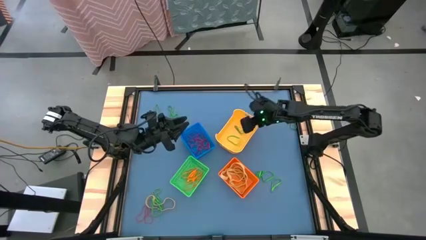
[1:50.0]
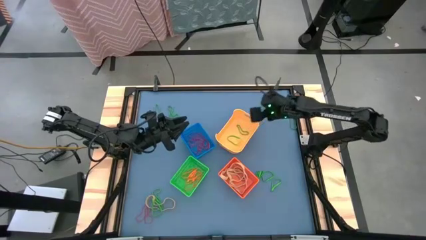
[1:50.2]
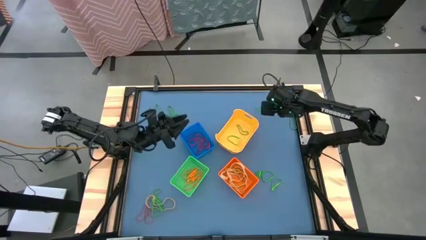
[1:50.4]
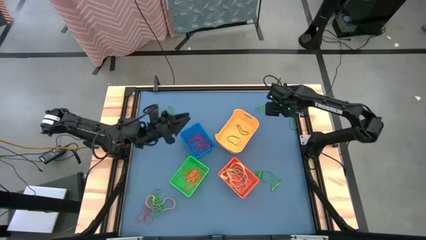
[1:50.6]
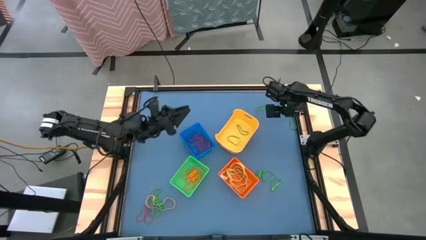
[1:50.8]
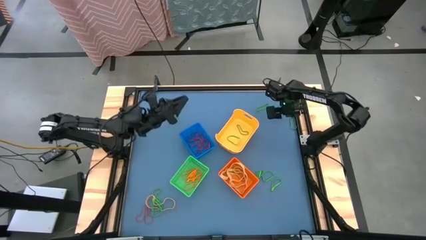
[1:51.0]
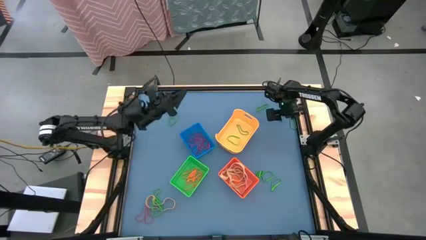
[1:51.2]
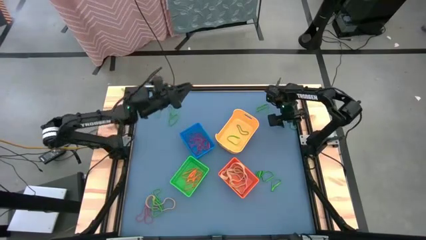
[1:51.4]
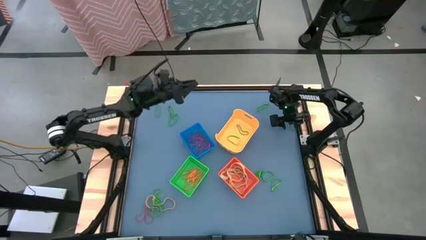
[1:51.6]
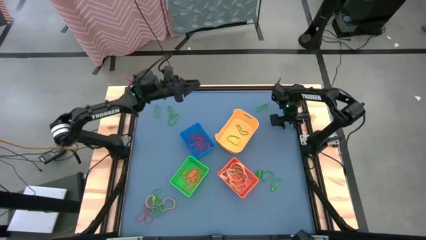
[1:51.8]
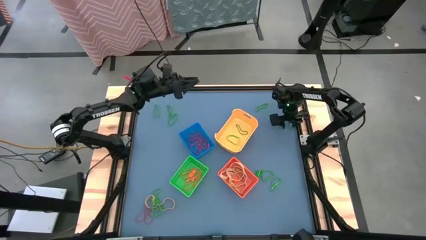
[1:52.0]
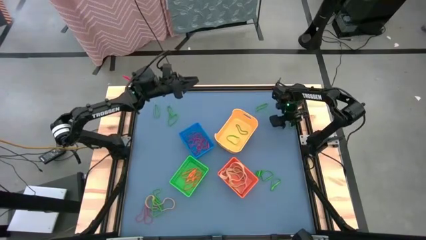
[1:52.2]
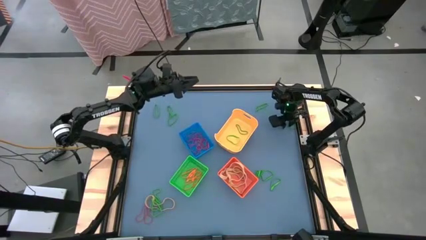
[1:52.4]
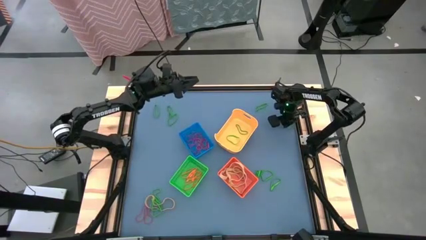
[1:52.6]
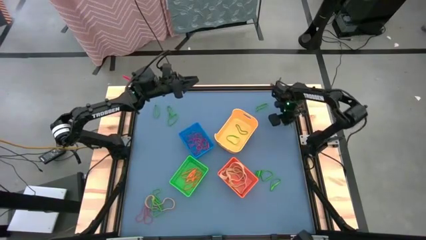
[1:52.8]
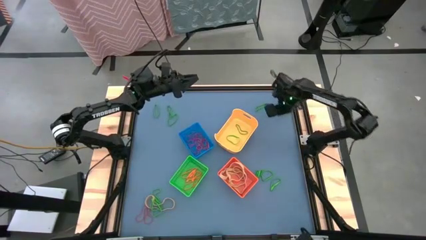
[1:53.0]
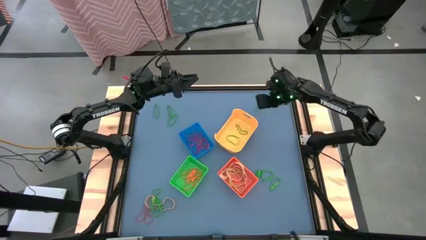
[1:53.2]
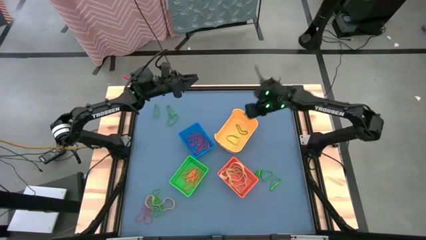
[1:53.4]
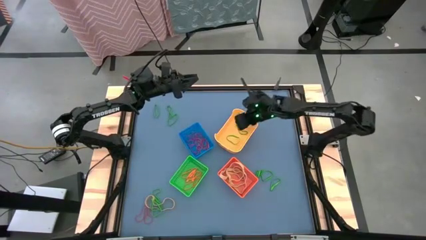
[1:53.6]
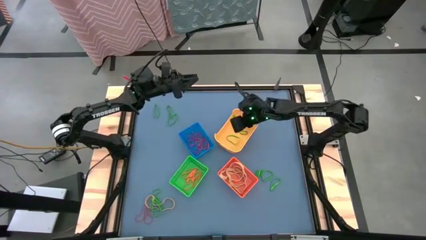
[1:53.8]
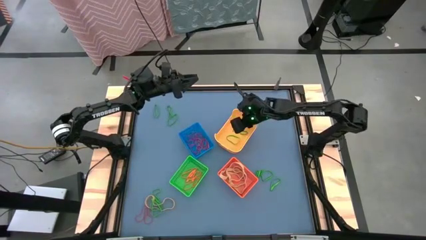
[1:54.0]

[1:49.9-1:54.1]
Task: Sort rubber bands into baskets
Put the green rubber band into the yellow bin

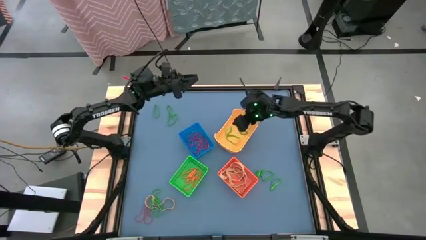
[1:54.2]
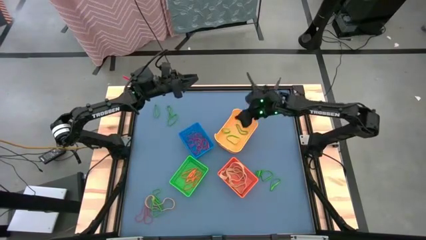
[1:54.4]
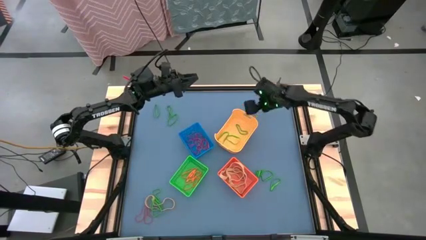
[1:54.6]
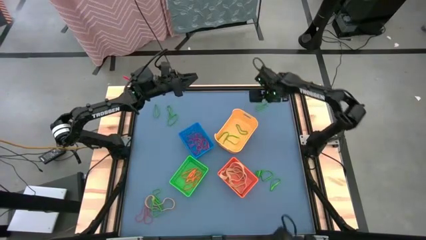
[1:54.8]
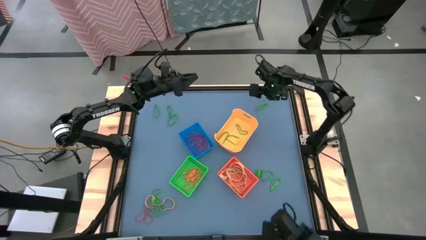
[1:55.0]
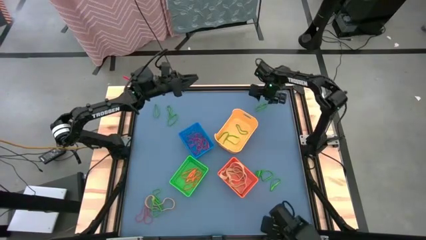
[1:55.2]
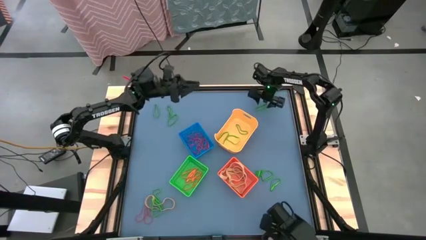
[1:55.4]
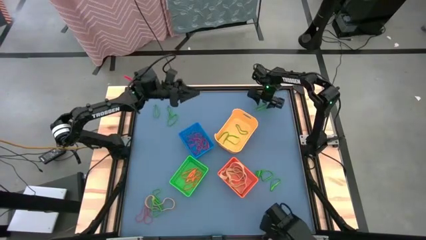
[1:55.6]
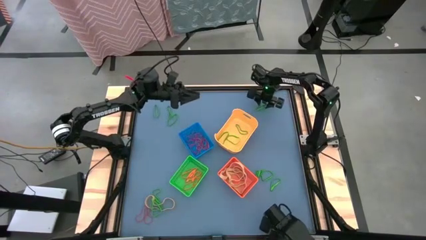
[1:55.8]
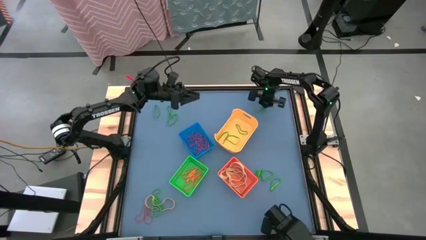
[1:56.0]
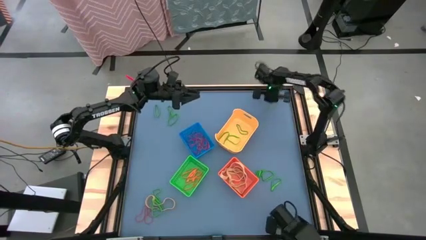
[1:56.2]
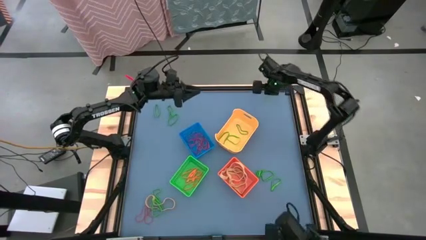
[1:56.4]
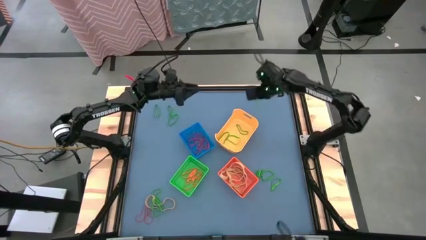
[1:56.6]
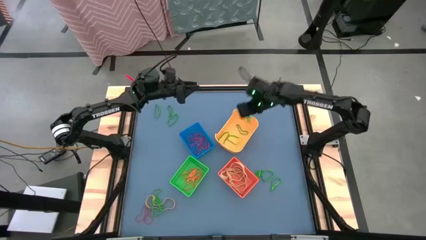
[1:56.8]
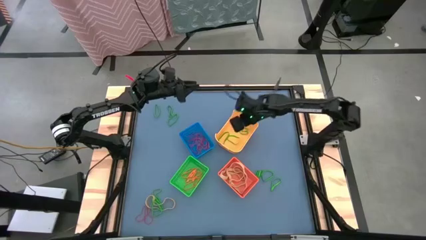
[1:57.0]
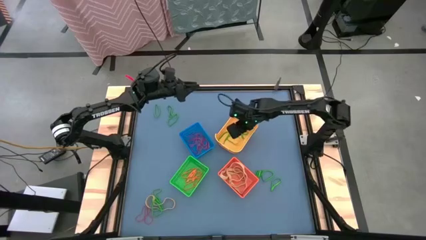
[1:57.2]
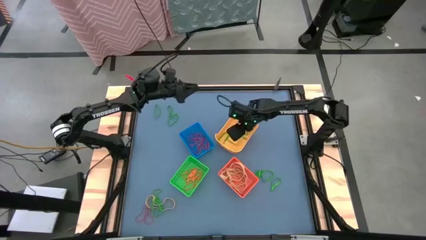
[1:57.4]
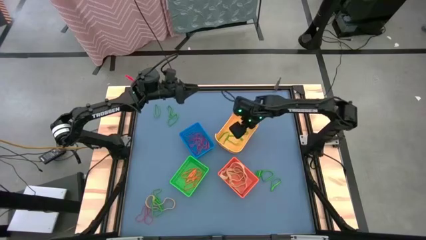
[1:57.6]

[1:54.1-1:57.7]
Put the green rubber band into the yellow bin

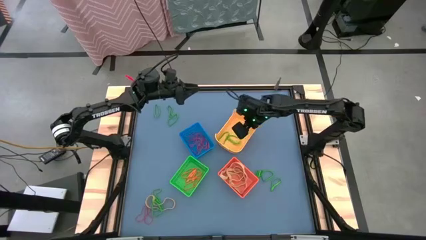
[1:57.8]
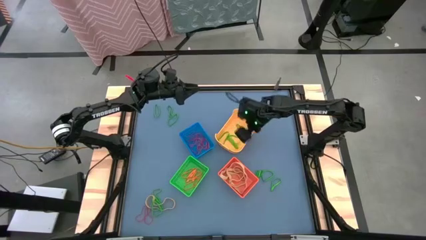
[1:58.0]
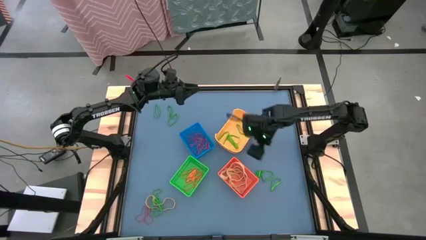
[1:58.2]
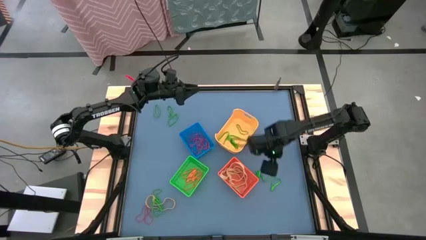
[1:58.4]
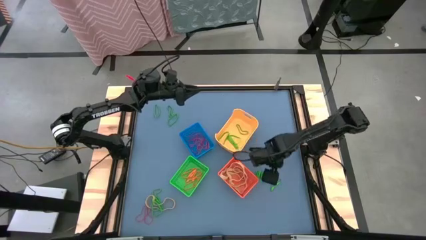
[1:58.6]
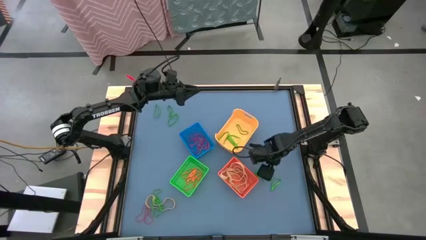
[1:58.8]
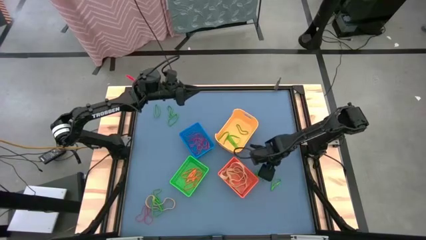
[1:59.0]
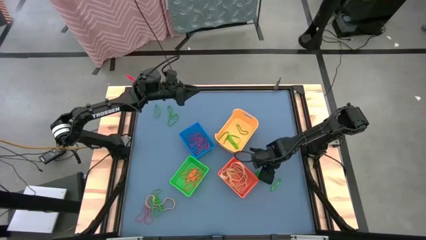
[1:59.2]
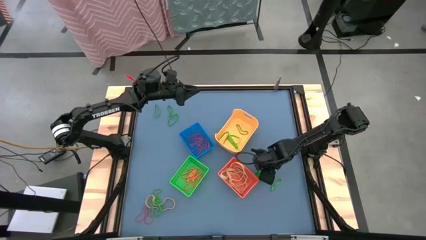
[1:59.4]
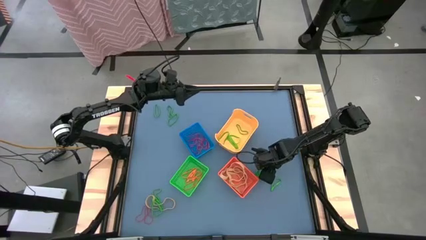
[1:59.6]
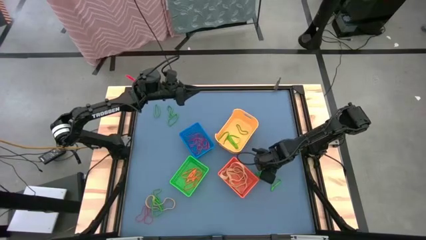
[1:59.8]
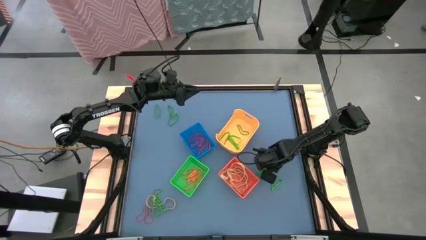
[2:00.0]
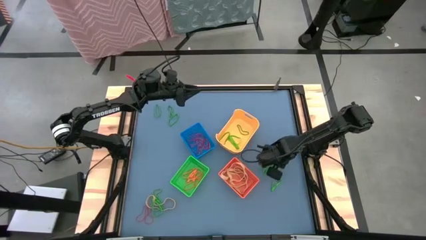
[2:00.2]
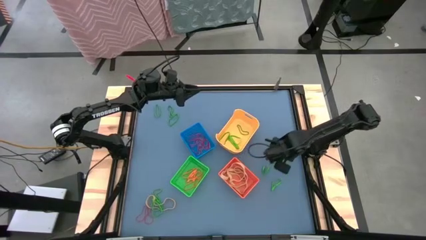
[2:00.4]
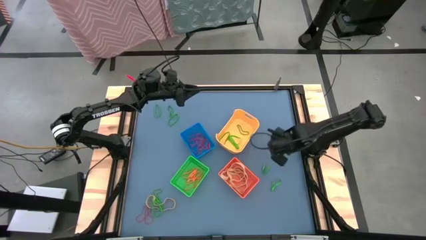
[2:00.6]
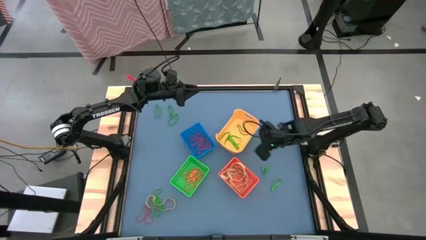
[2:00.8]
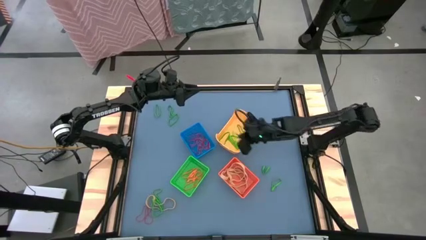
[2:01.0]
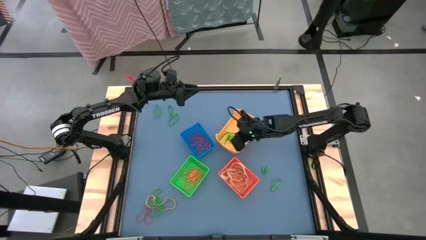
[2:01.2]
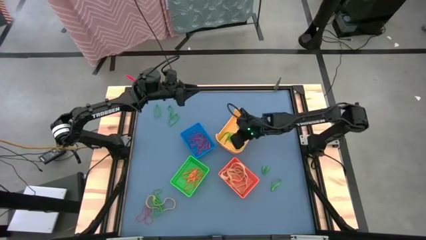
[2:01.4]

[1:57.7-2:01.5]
Put the green rubber band into the yellow bin

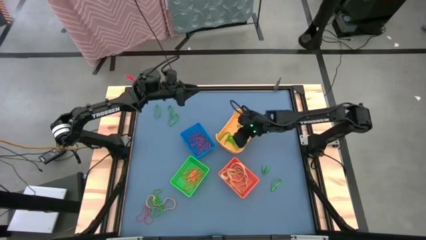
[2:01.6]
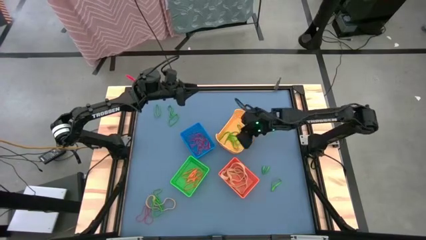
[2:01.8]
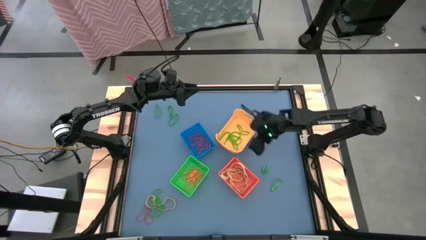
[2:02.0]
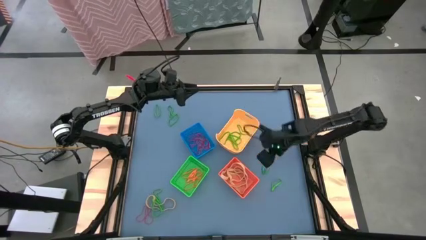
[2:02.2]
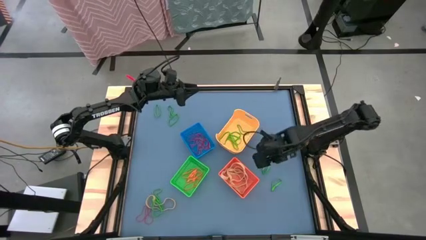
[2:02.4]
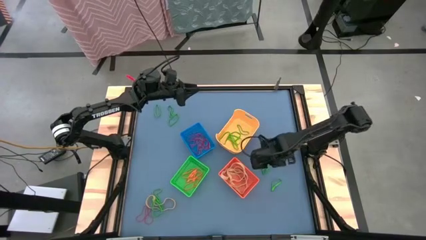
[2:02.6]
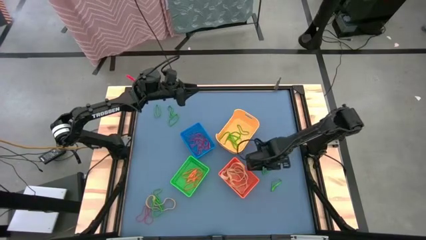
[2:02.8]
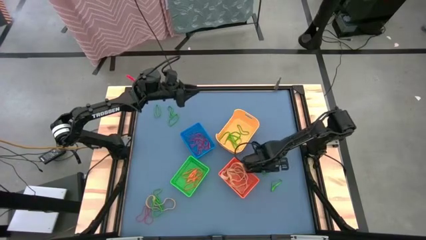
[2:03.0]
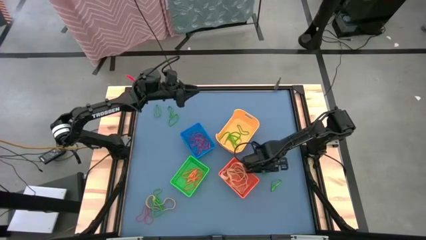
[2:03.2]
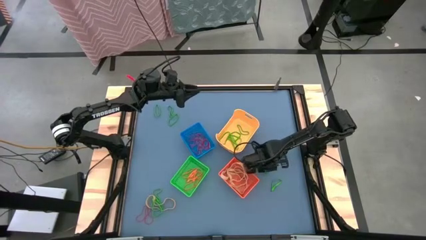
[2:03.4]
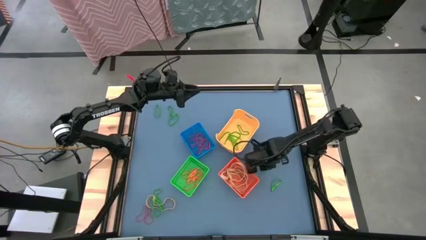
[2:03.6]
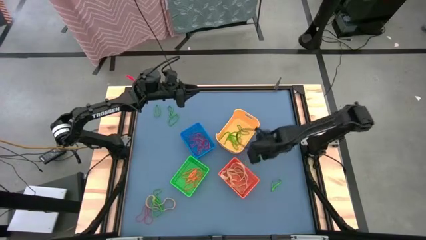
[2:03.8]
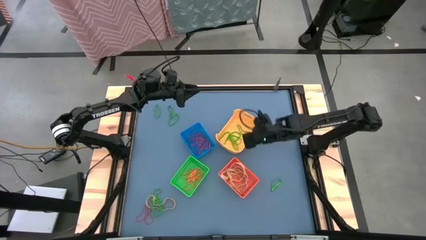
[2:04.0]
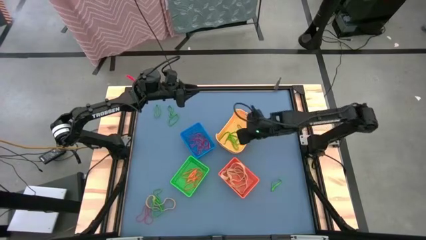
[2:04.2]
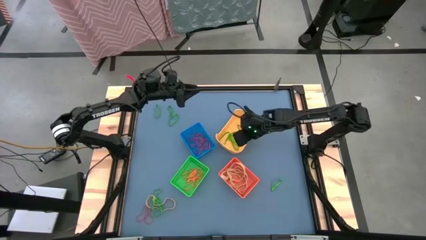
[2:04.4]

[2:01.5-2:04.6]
Put the green rubber band into the yellow bin

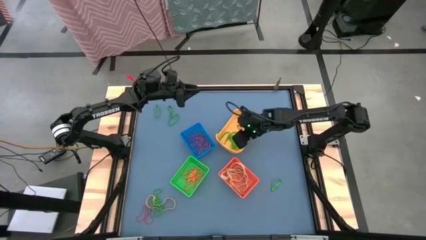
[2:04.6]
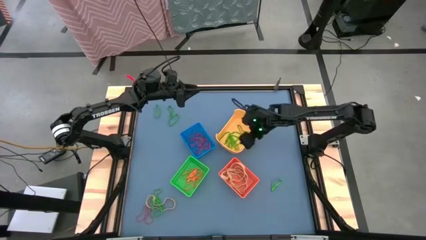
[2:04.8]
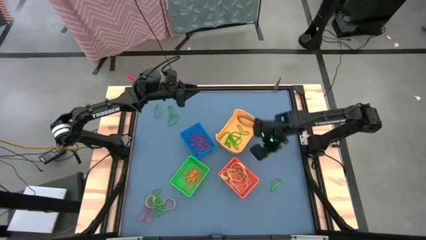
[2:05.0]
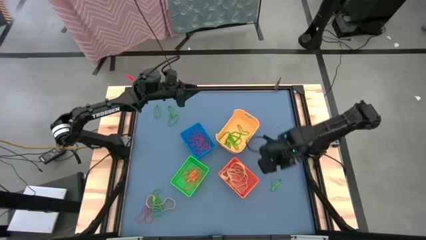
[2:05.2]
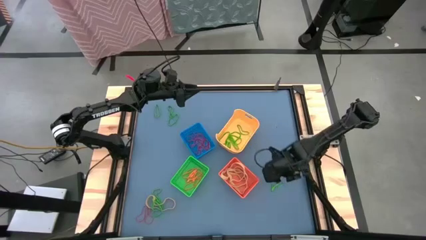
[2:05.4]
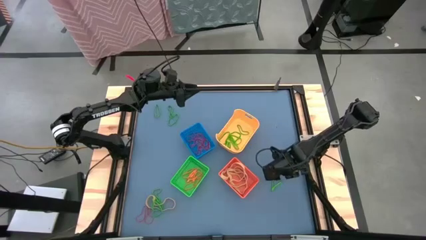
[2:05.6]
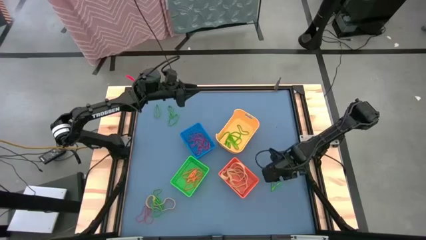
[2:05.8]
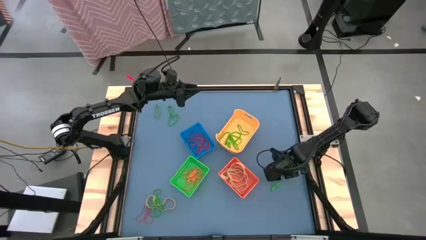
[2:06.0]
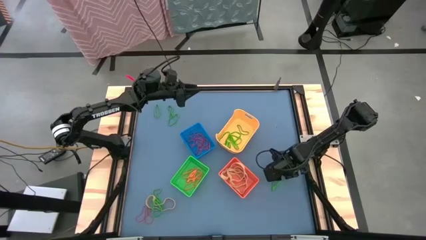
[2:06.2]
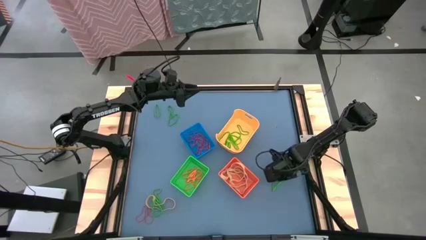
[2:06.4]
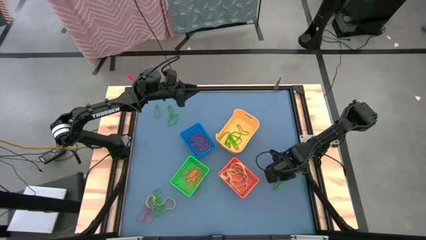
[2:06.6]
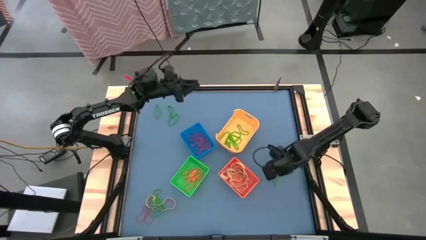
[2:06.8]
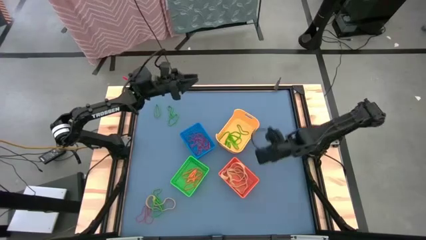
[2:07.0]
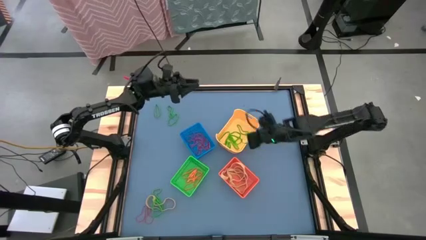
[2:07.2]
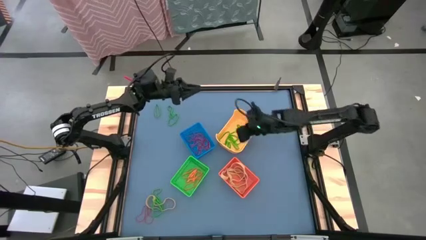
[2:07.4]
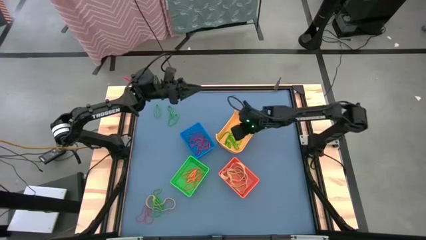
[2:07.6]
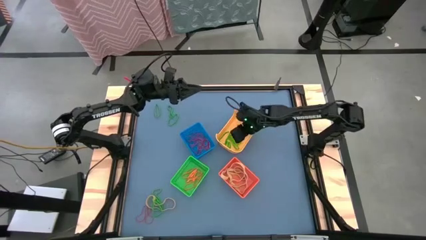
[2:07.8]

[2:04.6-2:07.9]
Put the green rubber band into the yellow bin
